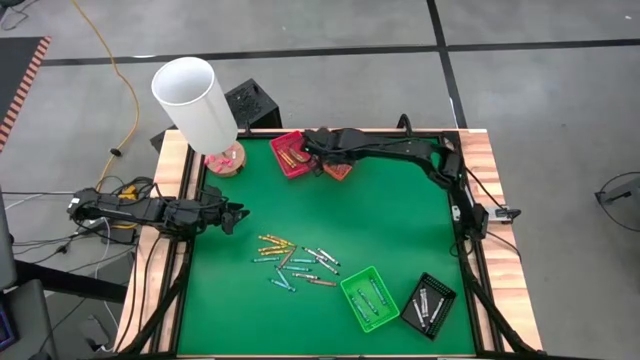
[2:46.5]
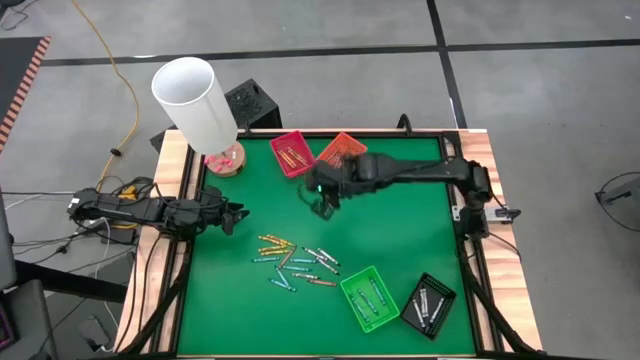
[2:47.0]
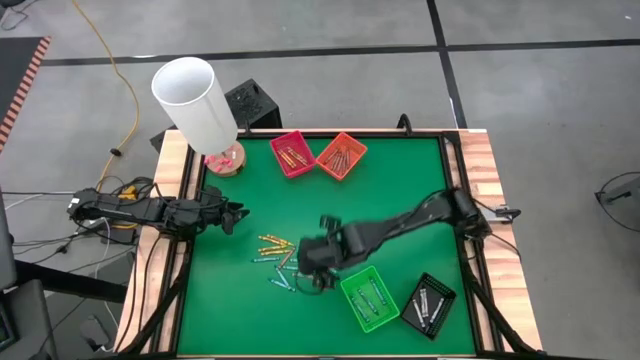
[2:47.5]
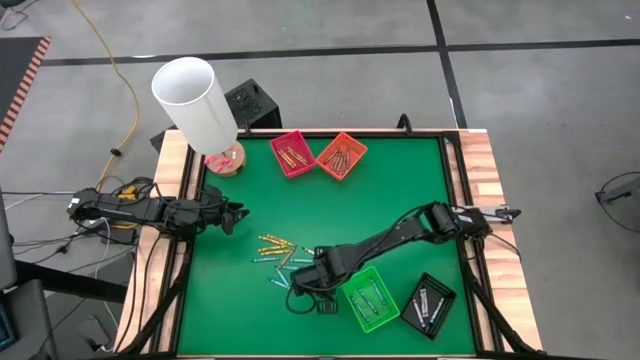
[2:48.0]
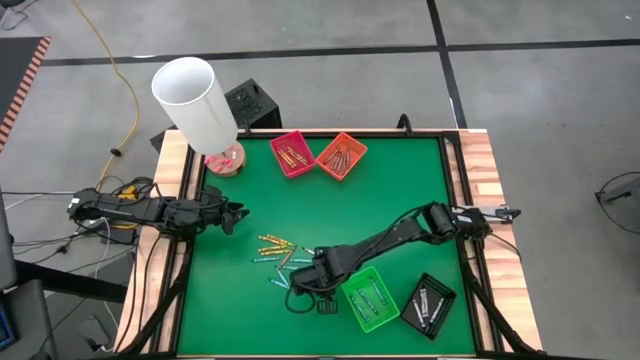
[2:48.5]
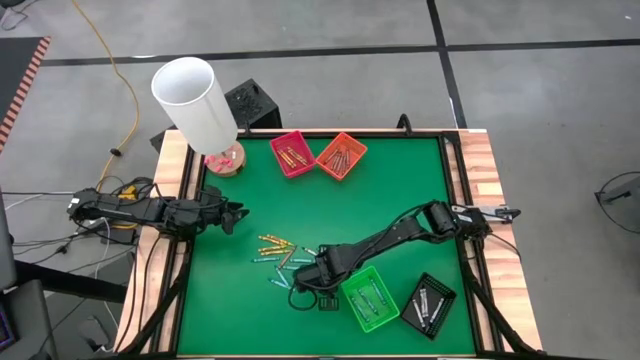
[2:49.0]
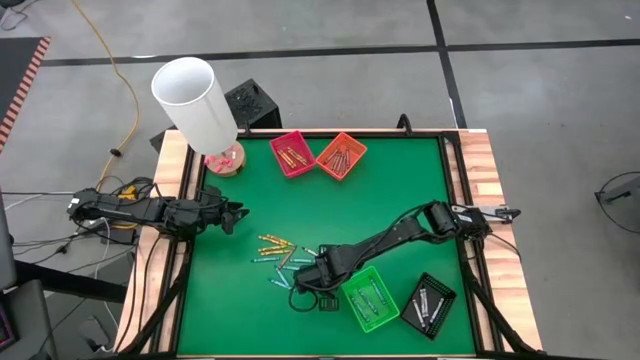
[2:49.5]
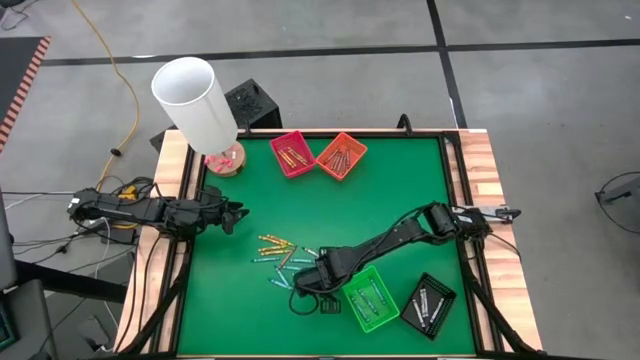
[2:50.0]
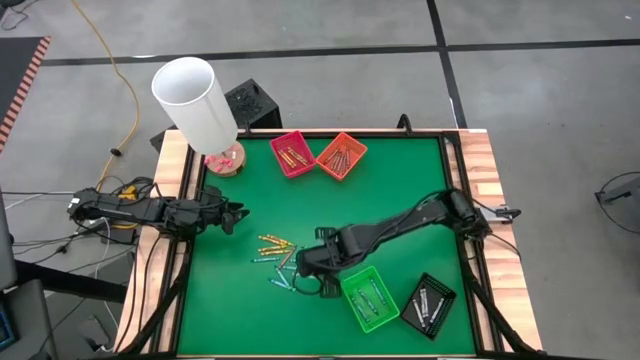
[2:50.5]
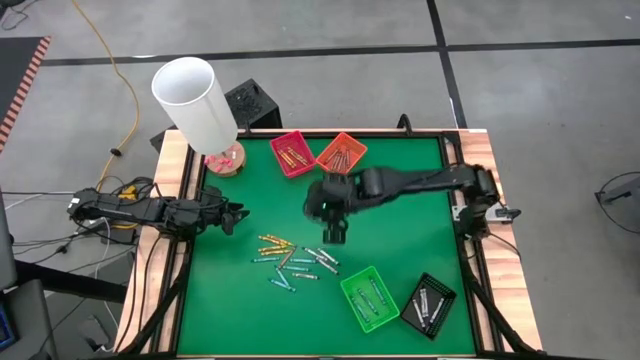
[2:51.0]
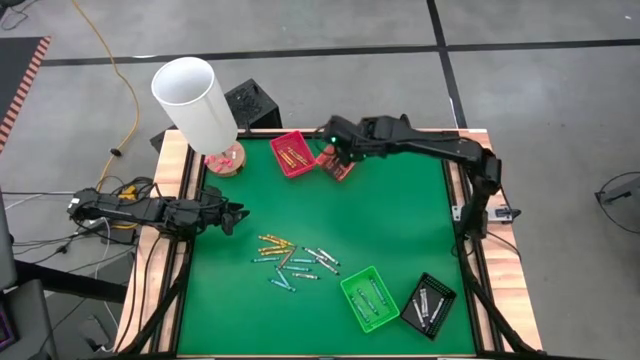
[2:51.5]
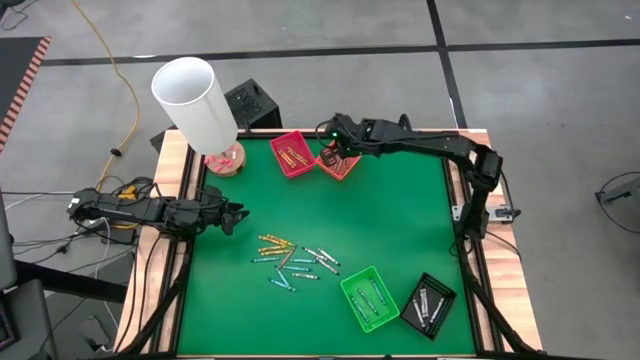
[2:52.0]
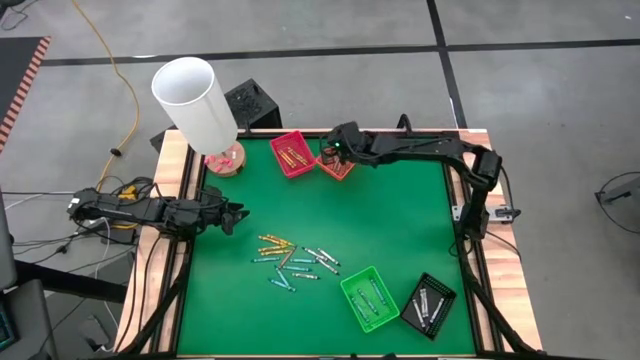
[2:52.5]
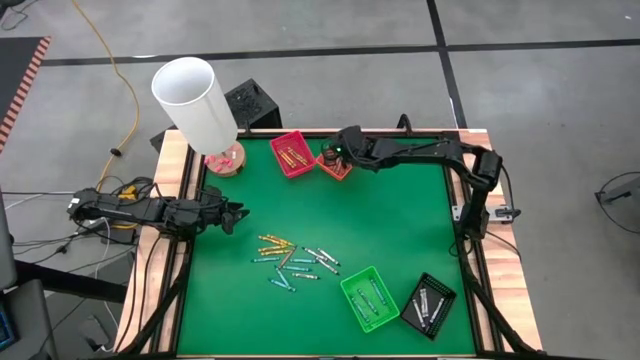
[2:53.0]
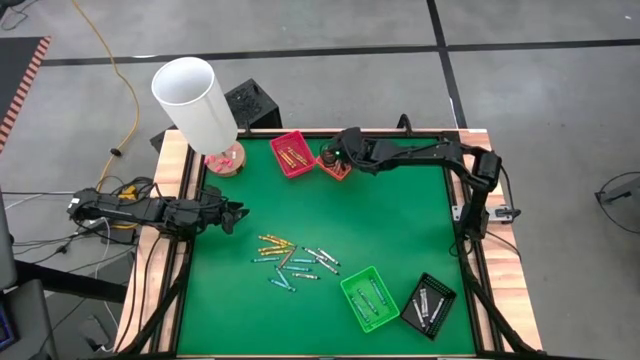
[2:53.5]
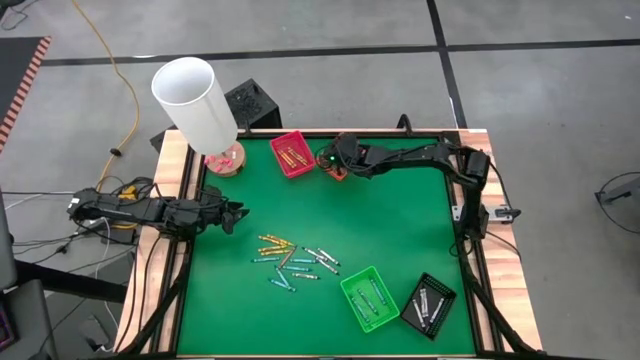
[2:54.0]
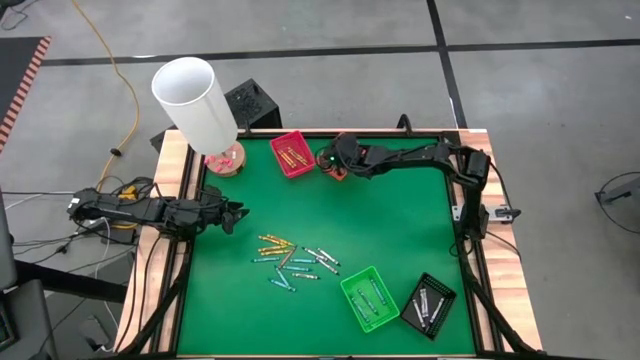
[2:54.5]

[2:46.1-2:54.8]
Task: Sort crayons
Put the brown crayon into the orange bin

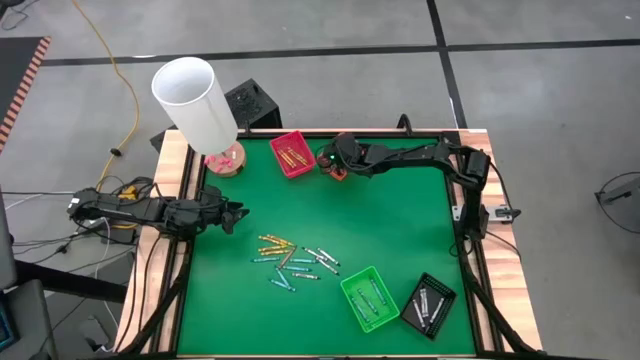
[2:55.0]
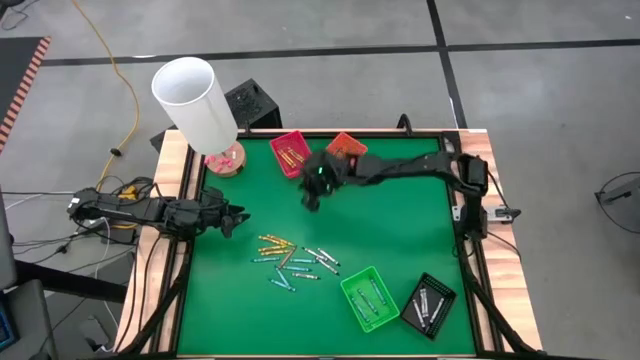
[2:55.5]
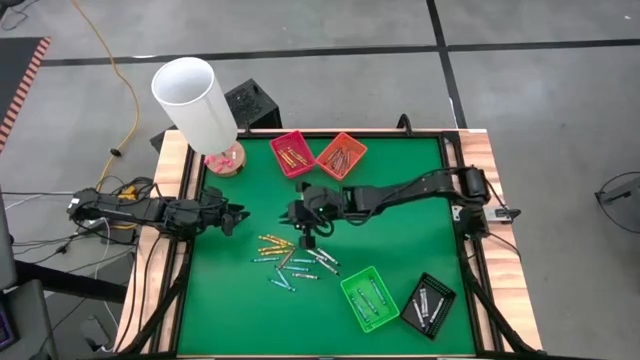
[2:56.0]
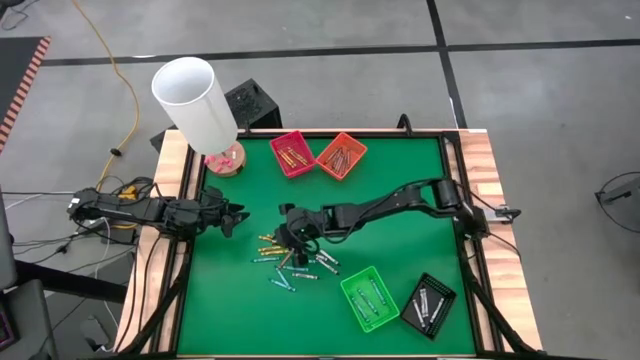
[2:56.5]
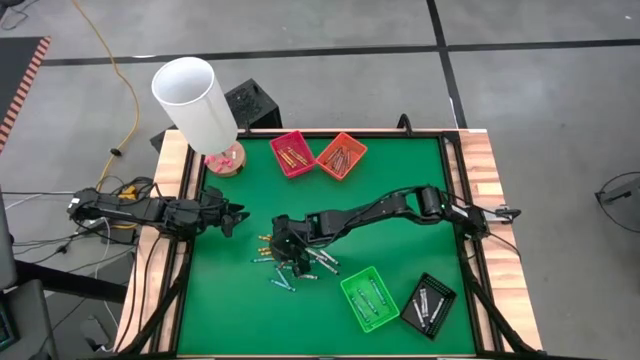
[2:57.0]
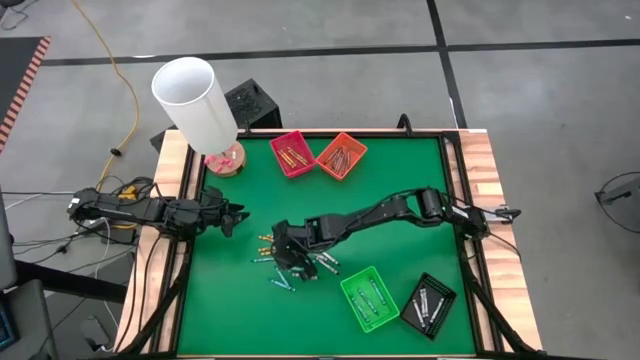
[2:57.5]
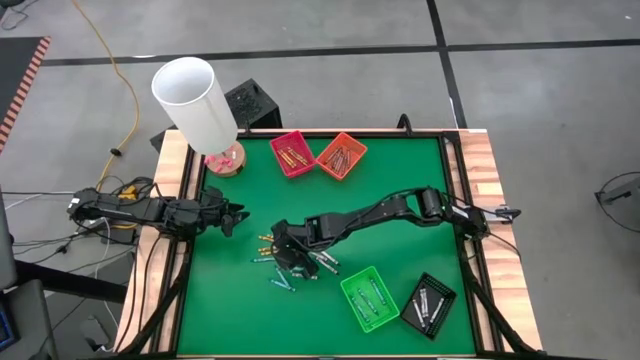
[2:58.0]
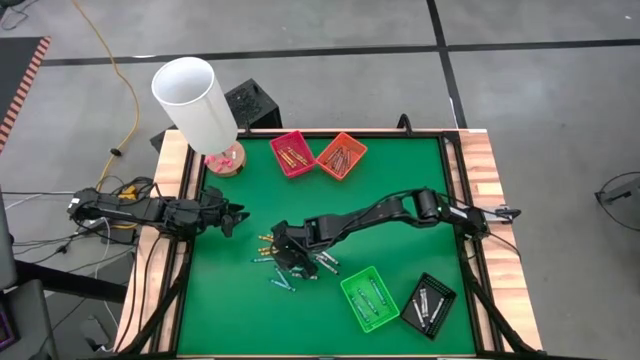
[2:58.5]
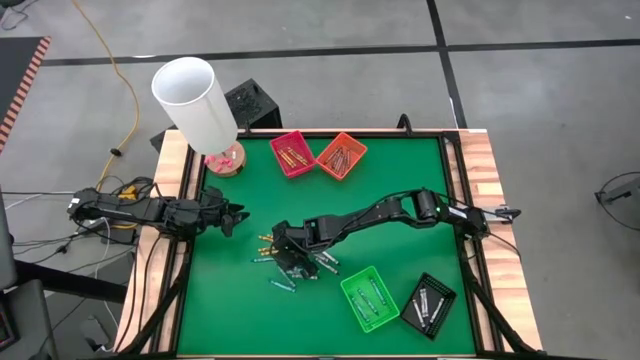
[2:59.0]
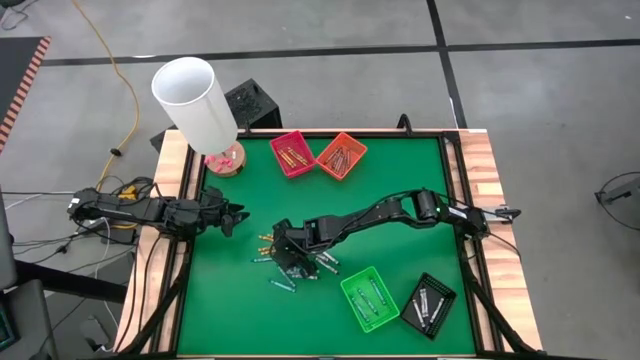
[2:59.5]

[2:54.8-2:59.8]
Put the brown crayon into the orange bin

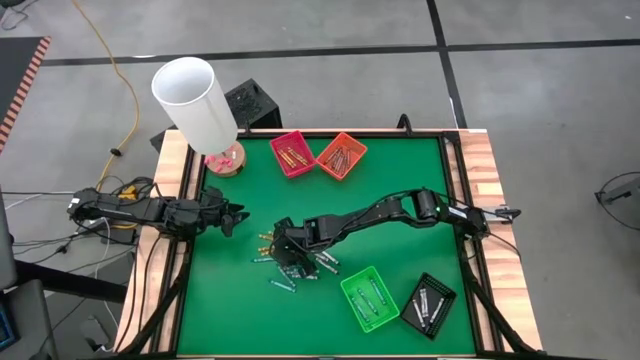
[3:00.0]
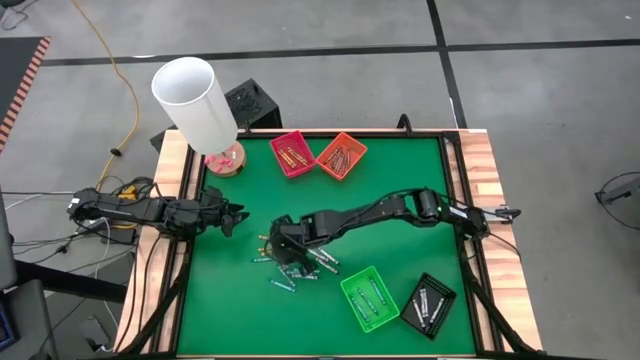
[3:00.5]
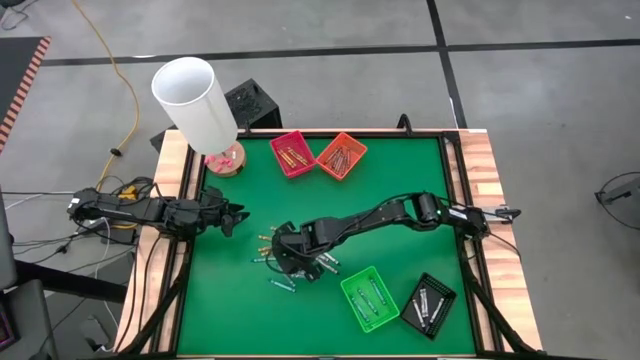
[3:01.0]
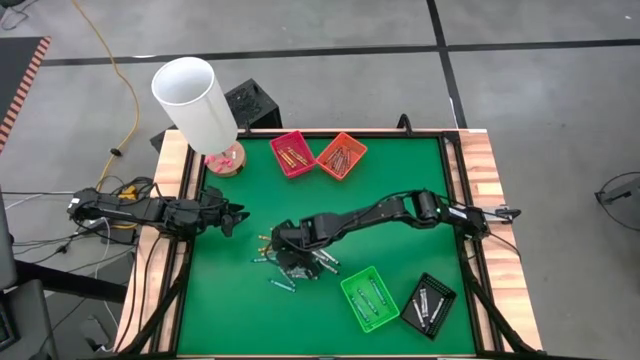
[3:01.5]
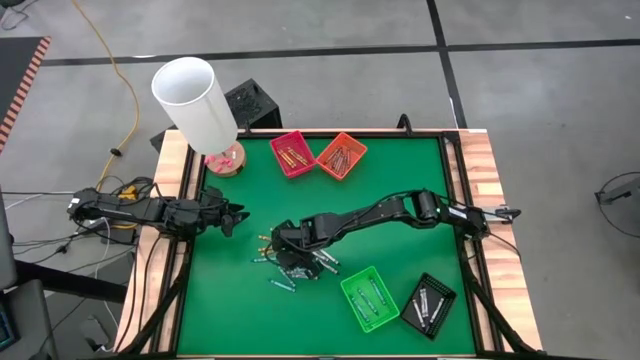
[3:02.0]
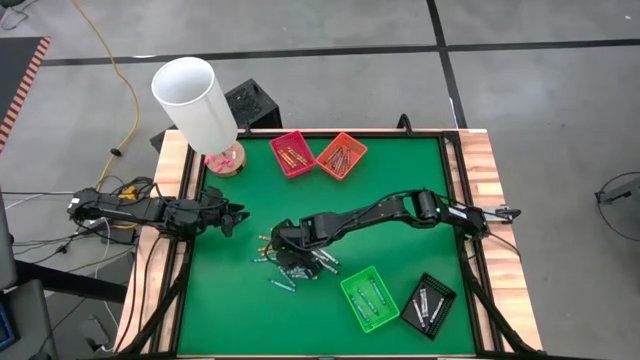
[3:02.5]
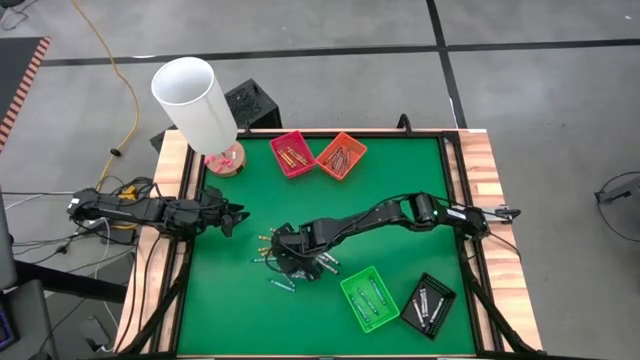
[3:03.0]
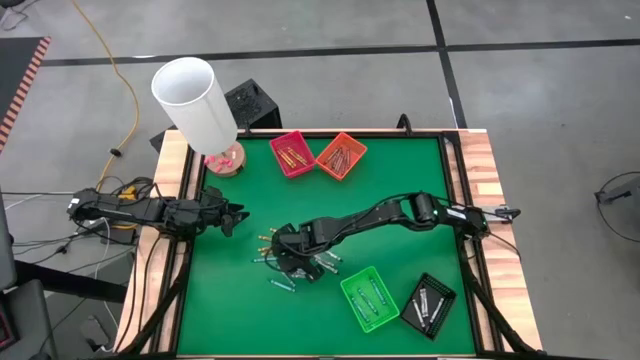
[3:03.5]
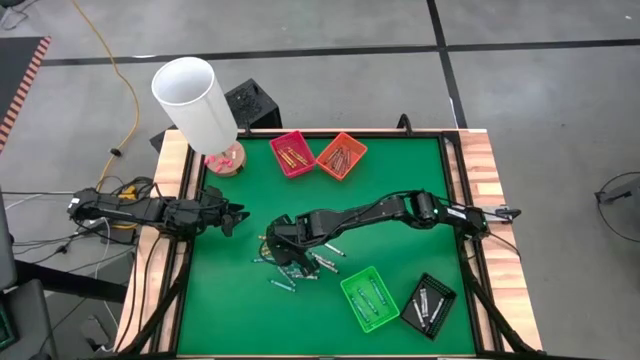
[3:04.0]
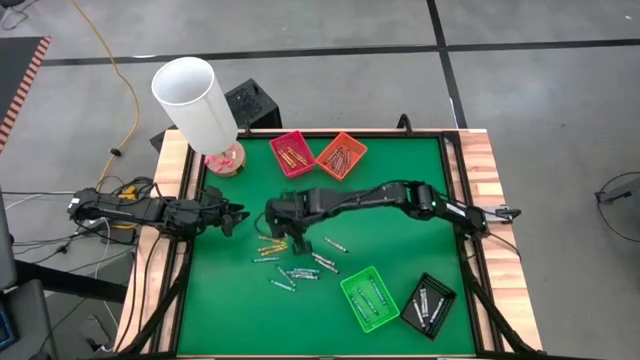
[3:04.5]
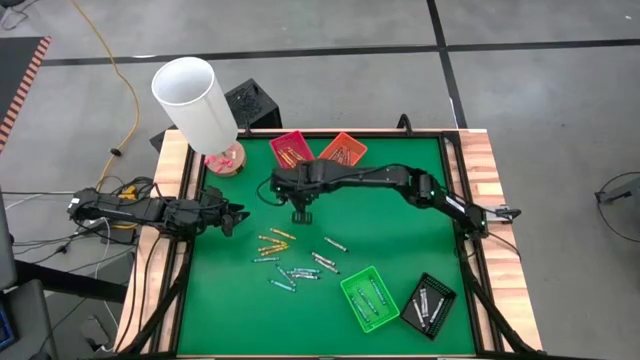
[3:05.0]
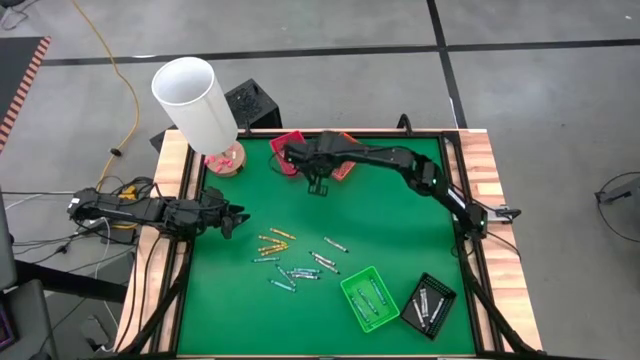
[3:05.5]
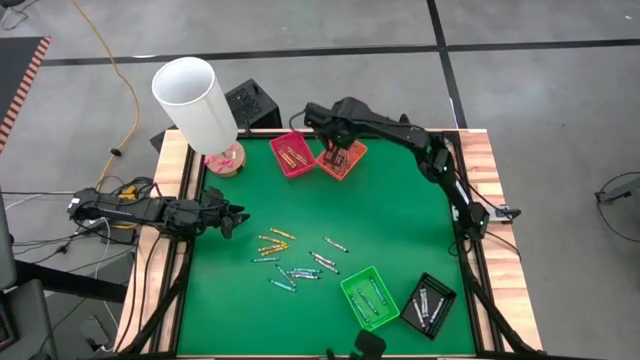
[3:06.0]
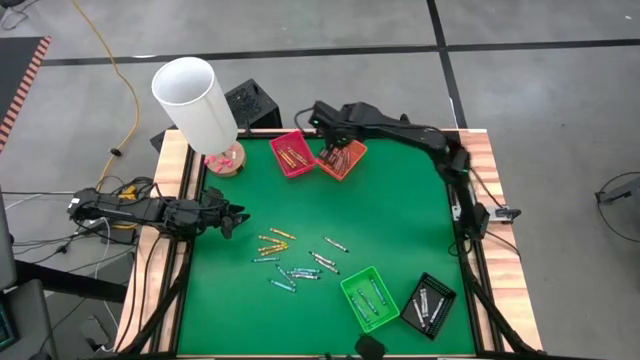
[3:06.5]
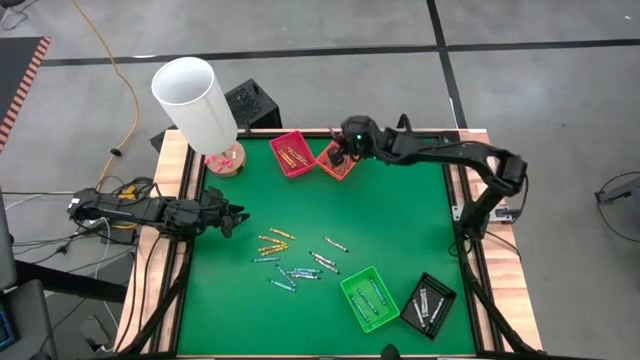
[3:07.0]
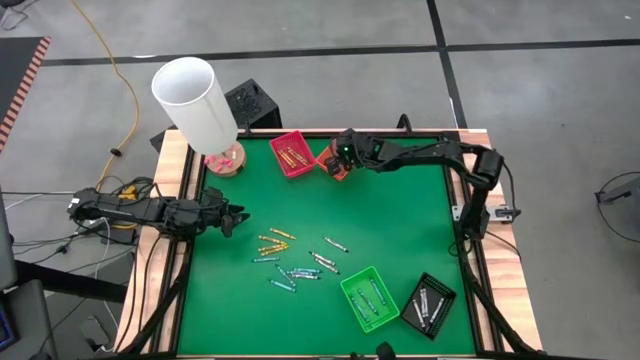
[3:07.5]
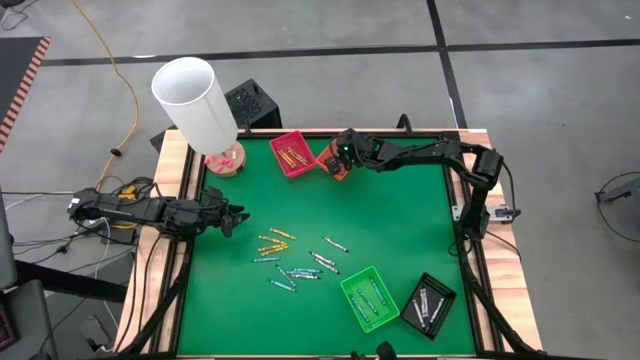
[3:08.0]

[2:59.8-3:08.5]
Put the brown crayon into the orange bin
